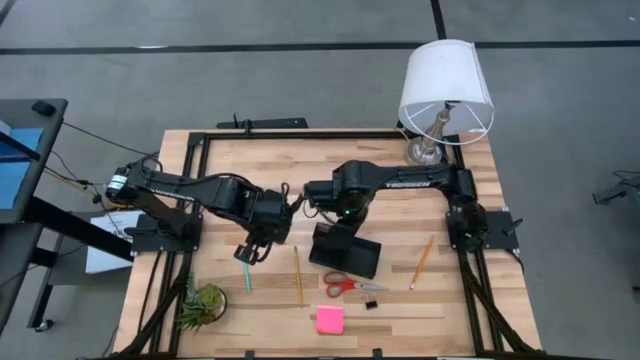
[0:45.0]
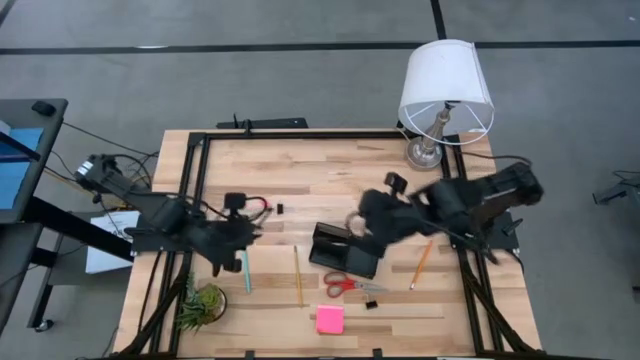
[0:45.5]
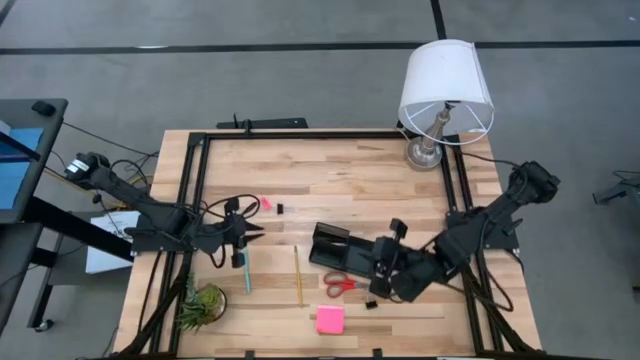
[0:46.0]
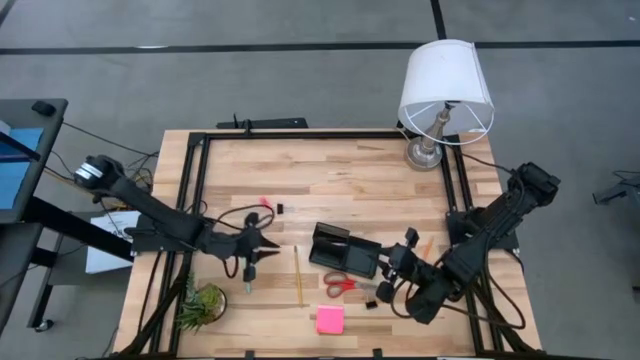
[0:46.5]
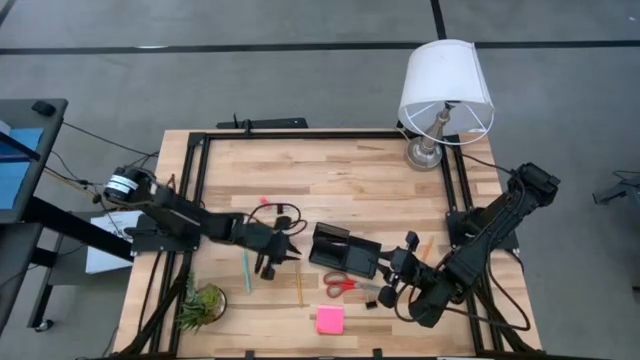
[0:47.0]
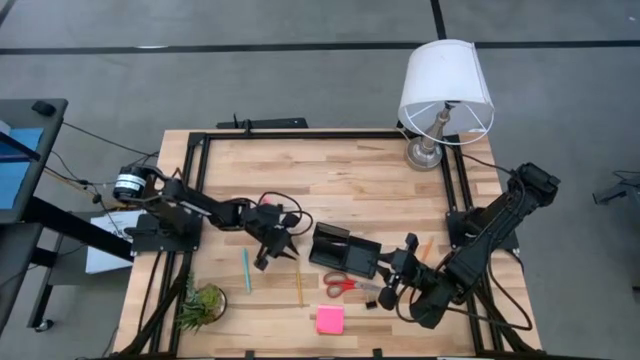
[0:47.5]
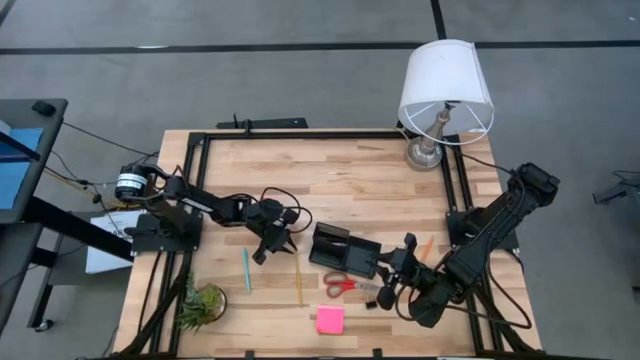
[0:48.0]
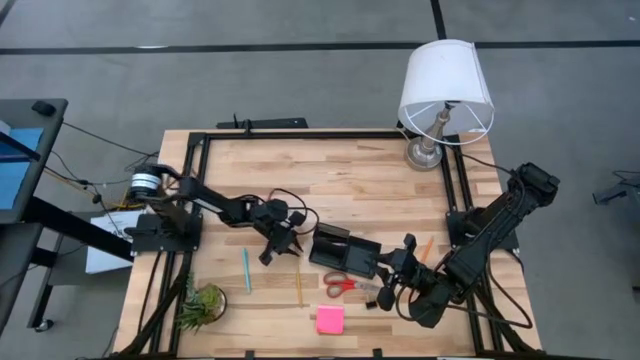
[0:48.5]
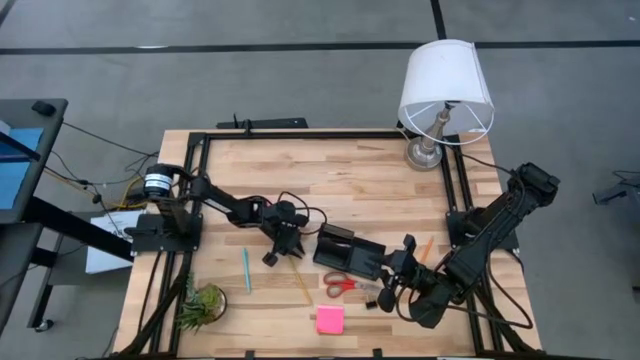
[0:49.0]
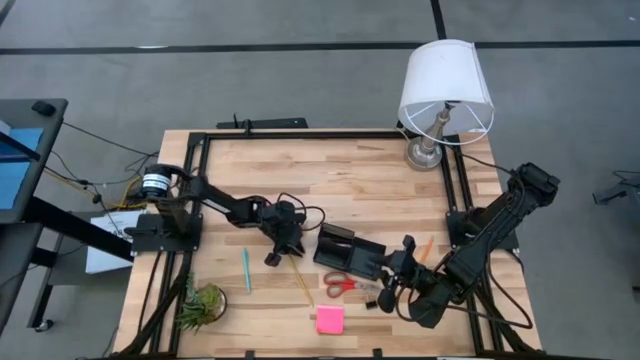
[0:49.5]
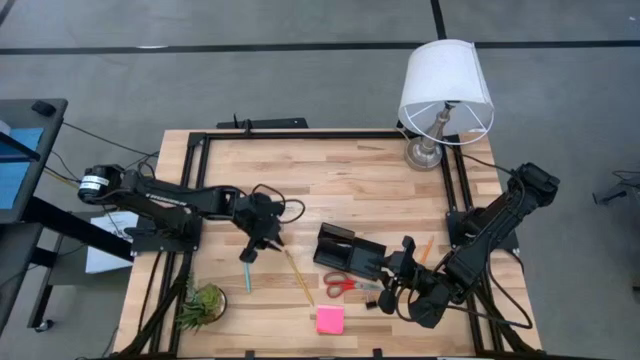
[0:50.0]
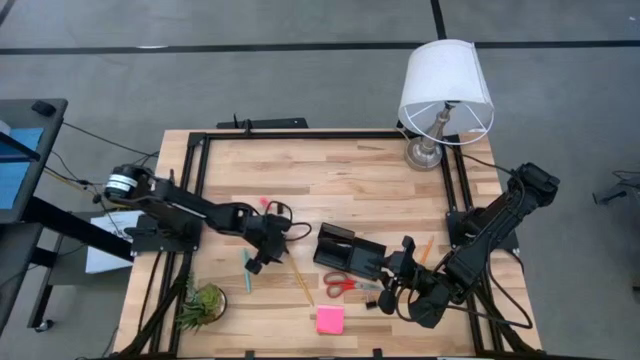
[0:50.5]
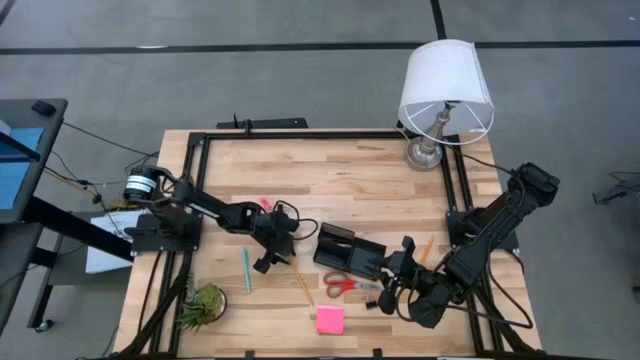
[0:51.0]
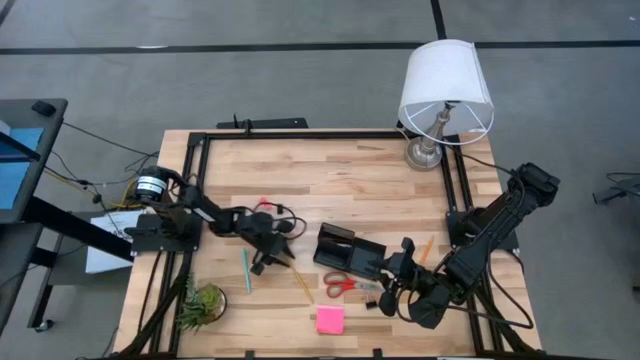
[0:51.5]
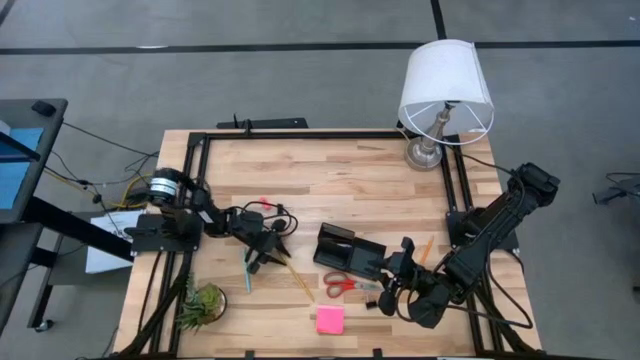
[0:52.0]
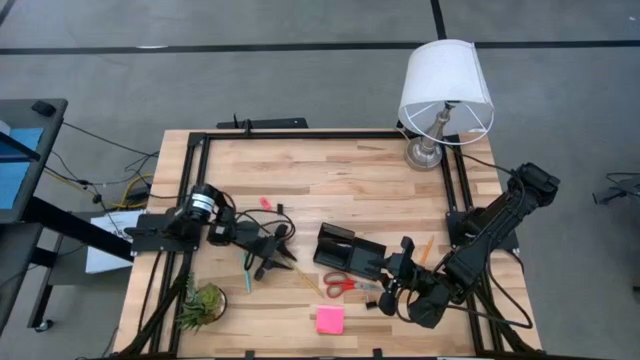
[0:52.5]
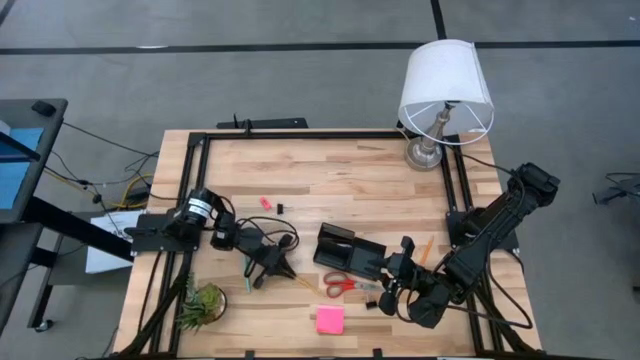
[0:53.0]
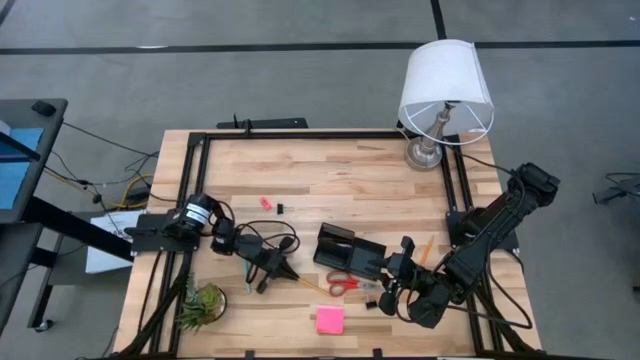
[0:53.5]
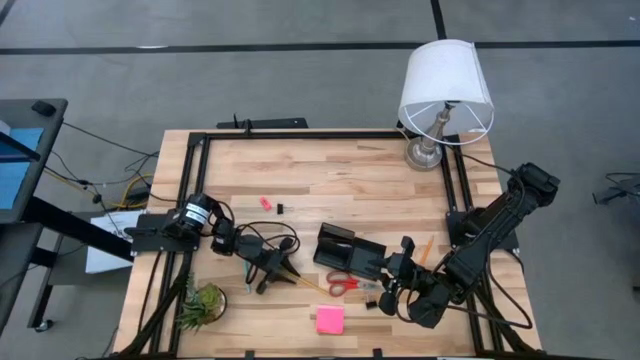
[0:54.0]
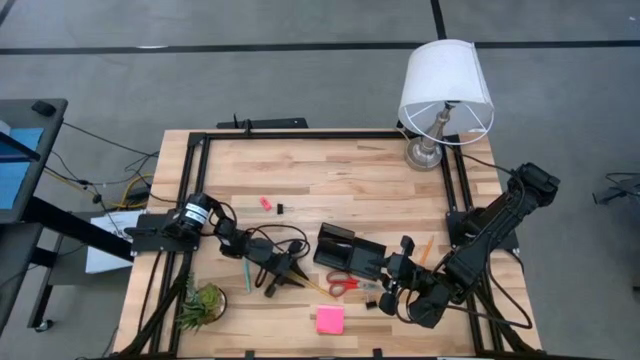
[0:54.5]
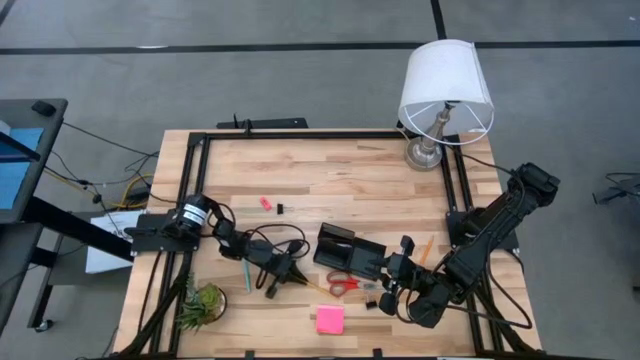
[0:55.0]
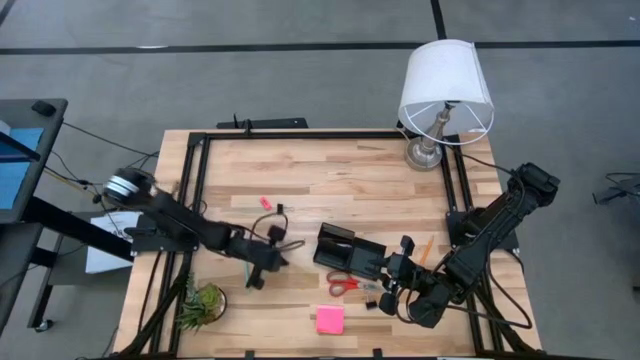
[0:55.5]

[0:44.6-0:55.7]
Task: Pick and place office supplies into organizer
Put the left yellow pencil into the desk organizer

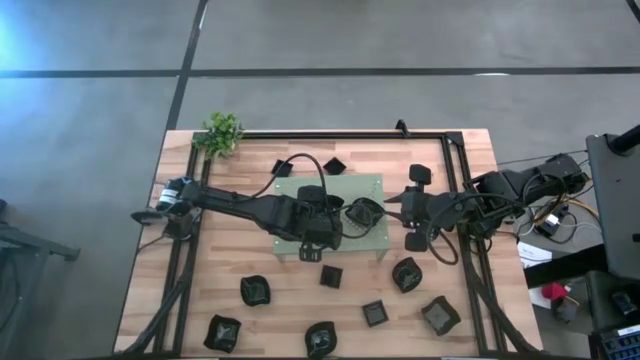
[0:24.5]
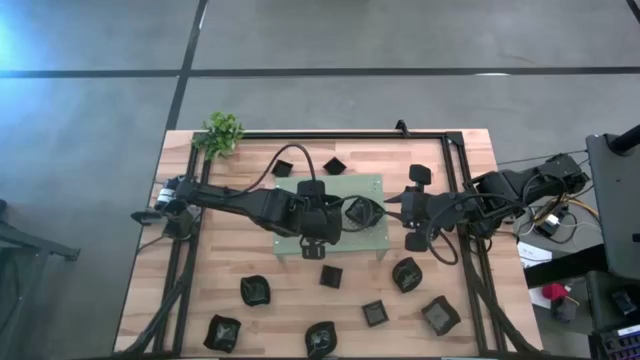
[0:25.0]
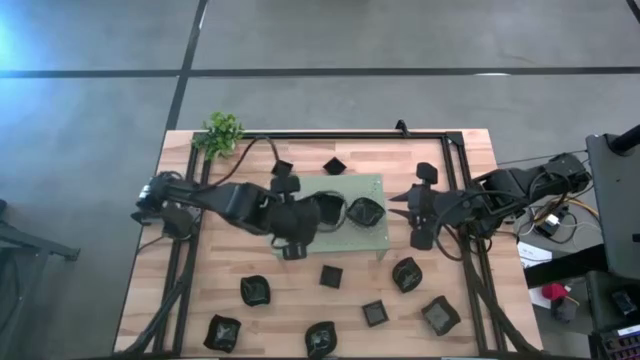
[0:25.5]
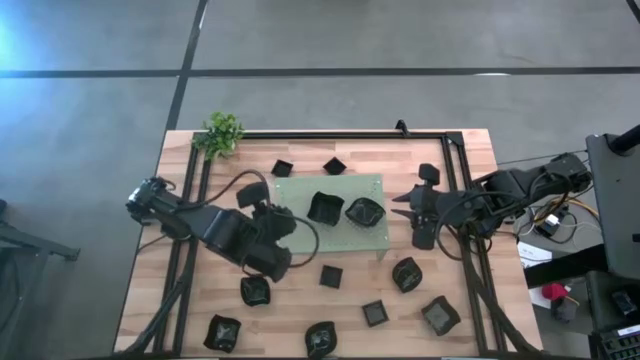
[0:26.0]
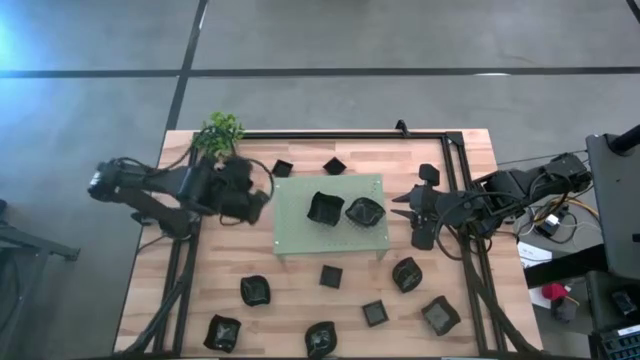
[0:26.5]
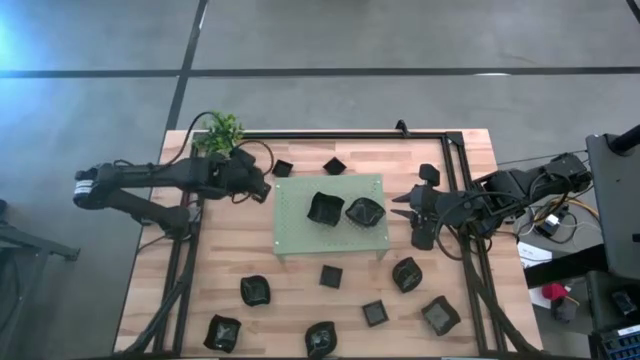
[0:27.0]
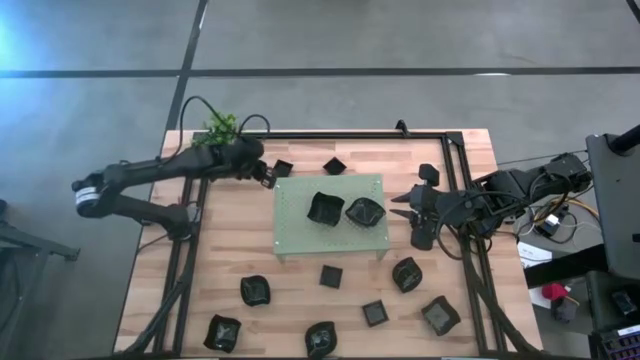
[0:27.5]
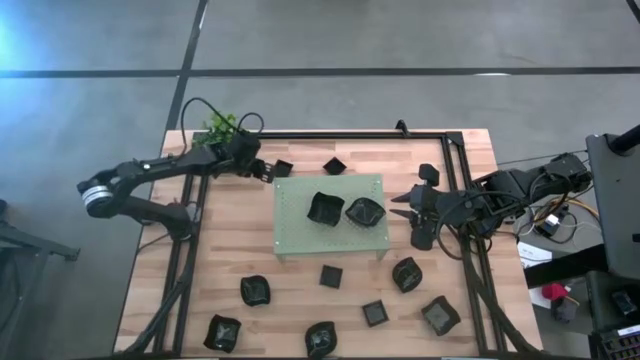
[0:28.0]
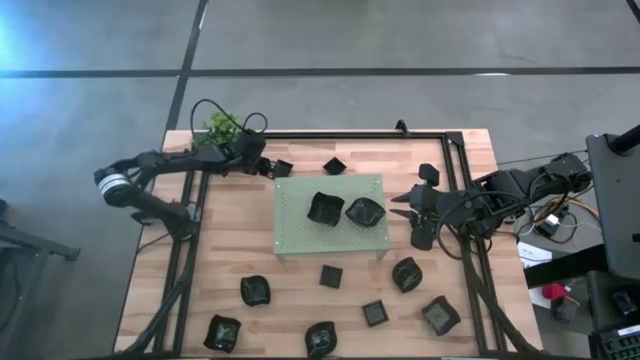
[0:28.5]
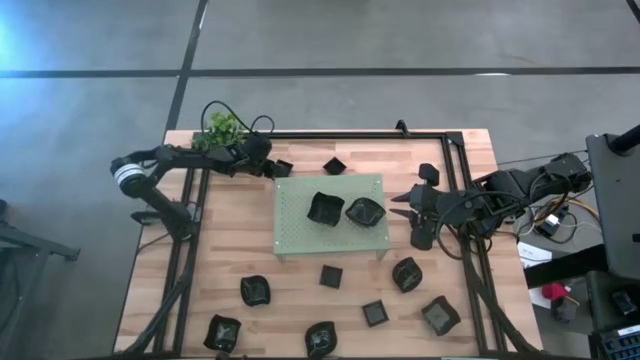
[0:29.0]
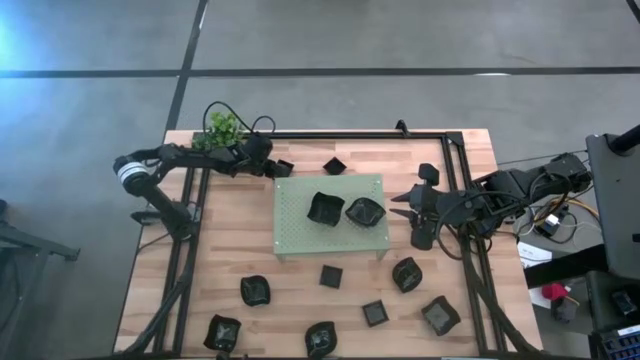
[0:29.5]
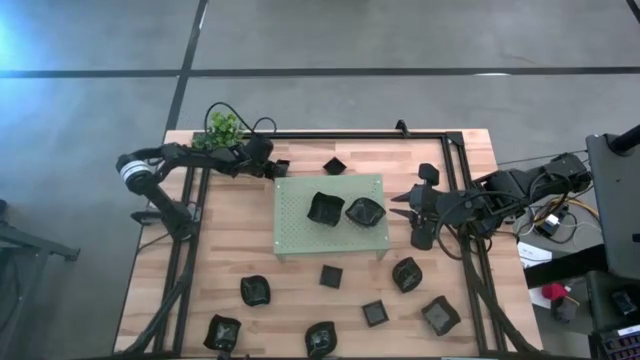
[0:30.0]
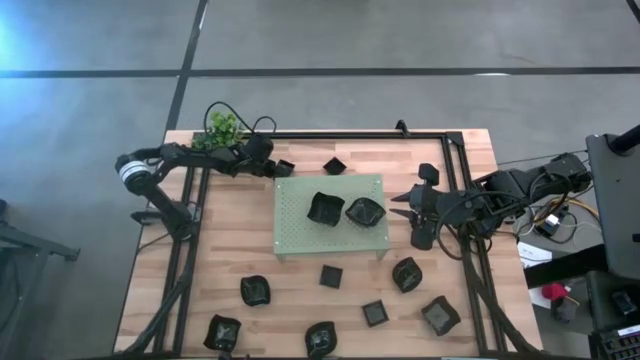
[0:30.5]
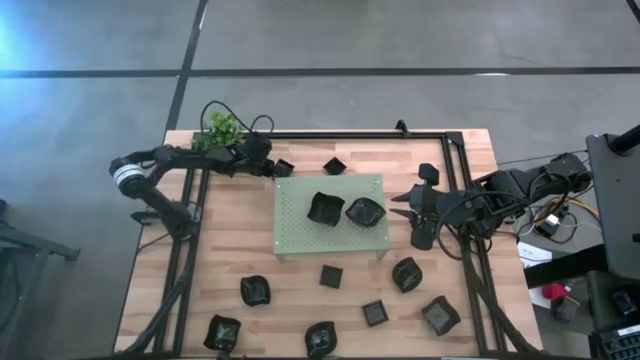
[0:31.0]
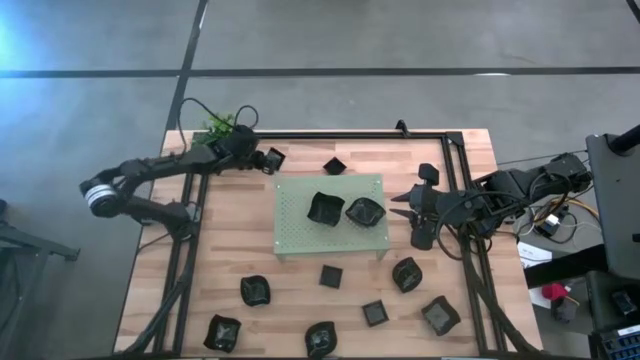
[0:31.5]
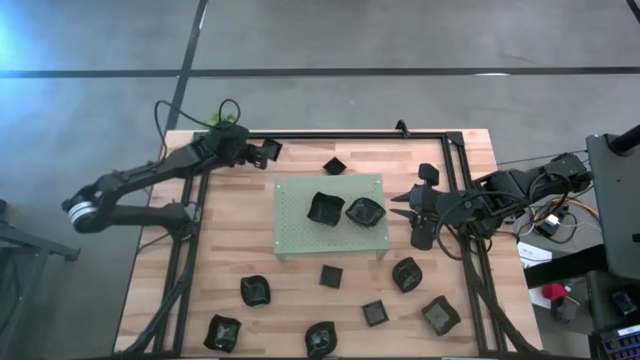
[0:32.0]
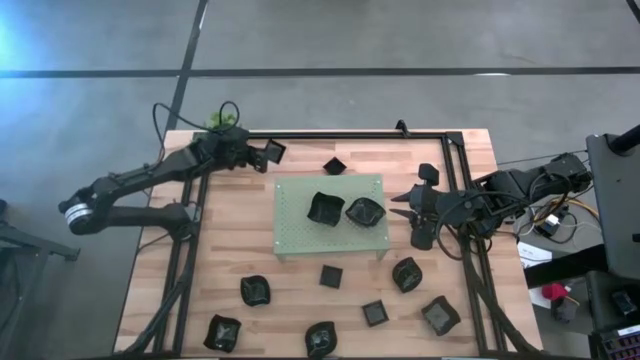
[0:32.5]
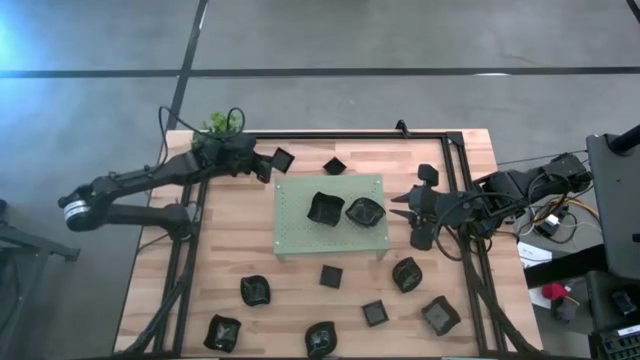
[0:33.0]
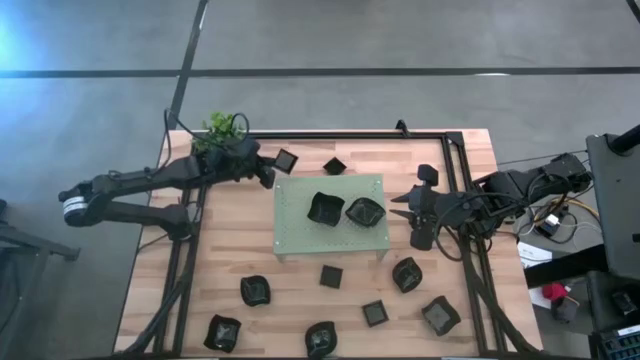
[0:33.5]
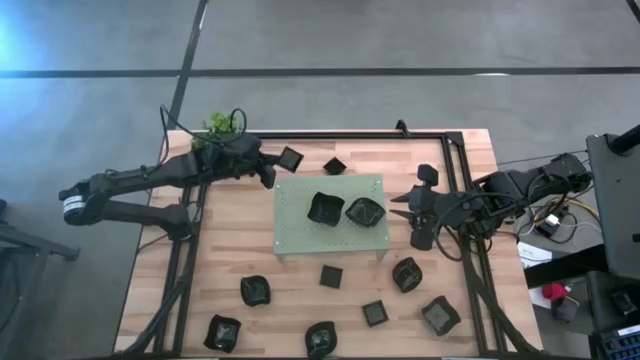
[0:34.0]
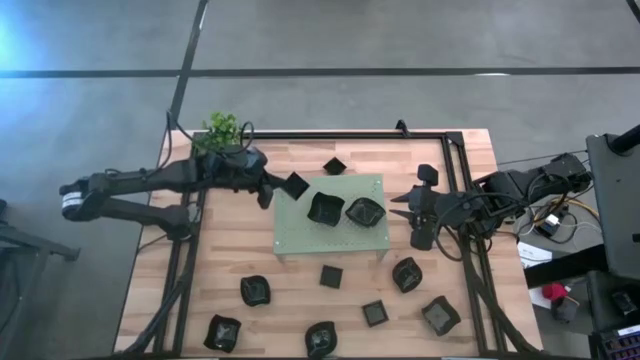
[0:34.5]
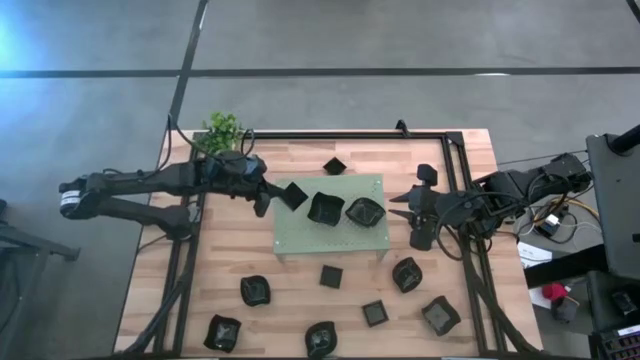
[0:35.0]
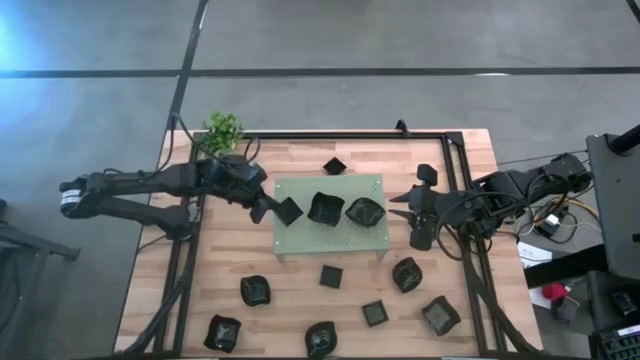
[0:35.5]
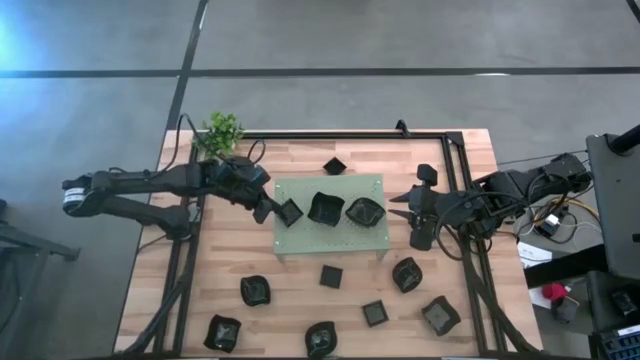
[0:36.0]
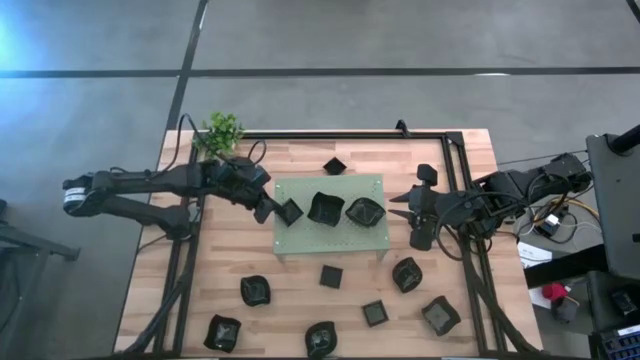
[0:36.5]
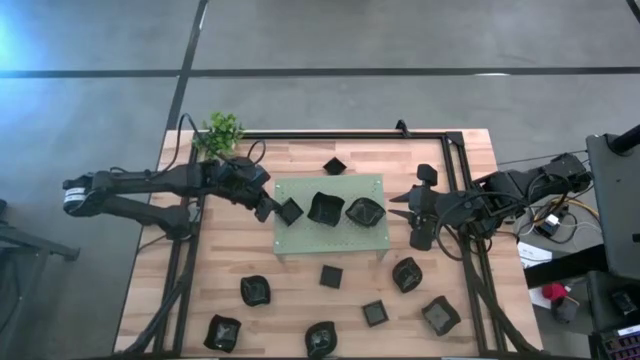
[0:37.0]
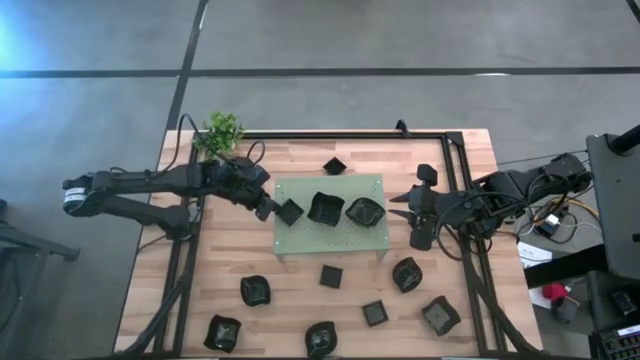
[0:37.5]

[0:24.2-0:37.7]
Task: Pick & Place Mini shaped plates
Put the square plate on the shelf
